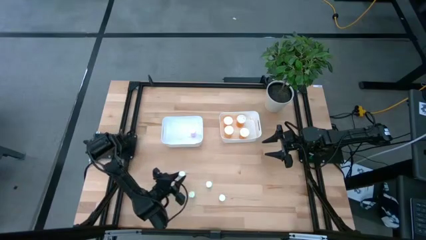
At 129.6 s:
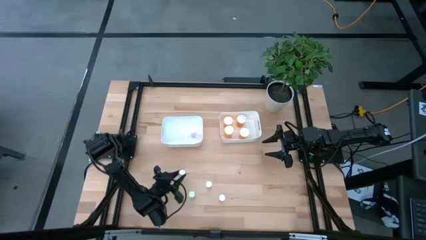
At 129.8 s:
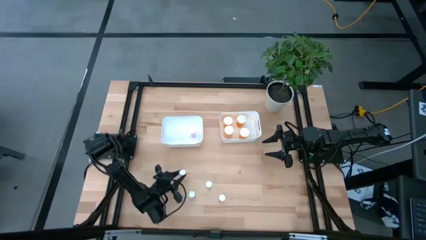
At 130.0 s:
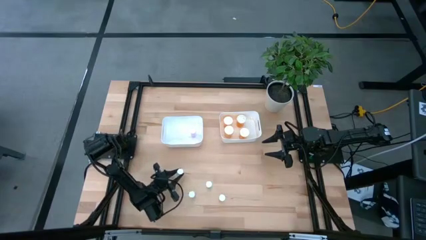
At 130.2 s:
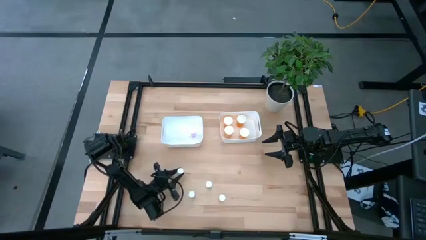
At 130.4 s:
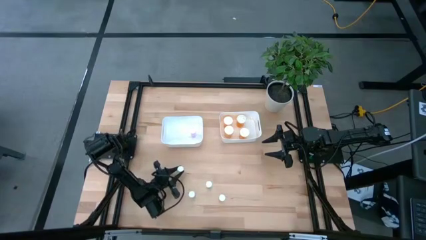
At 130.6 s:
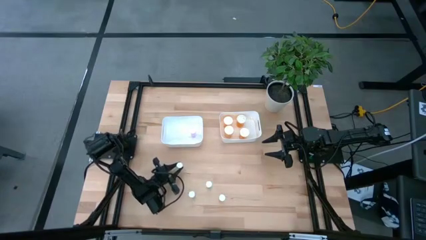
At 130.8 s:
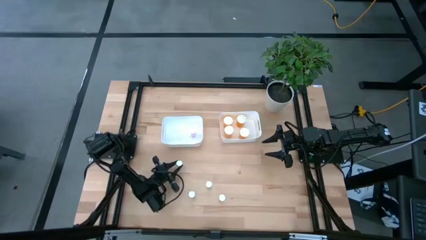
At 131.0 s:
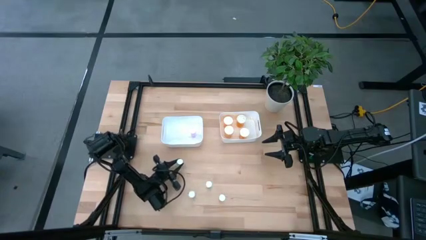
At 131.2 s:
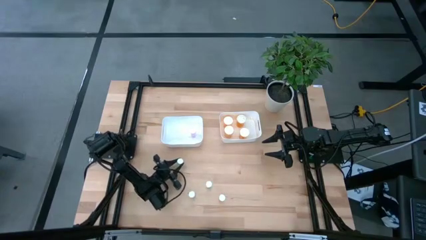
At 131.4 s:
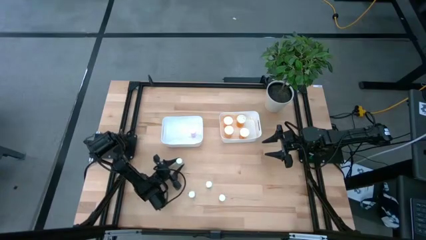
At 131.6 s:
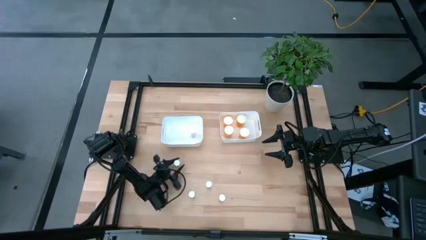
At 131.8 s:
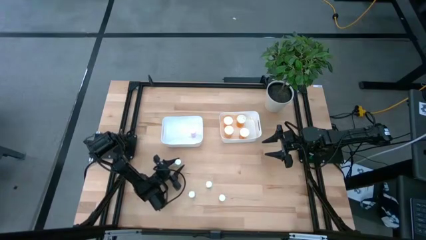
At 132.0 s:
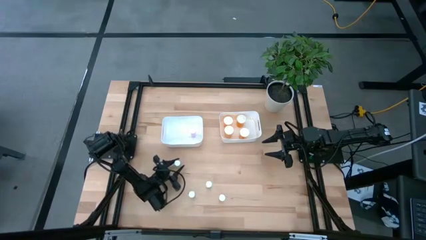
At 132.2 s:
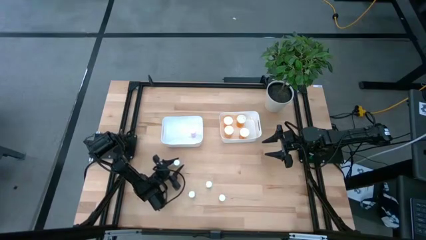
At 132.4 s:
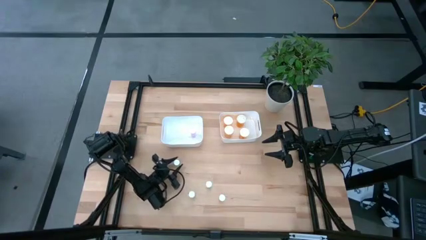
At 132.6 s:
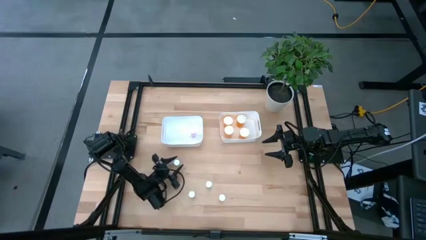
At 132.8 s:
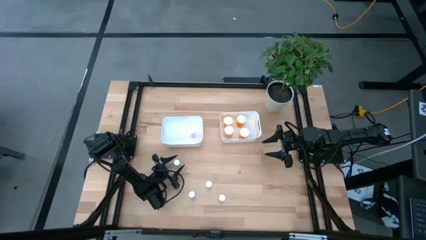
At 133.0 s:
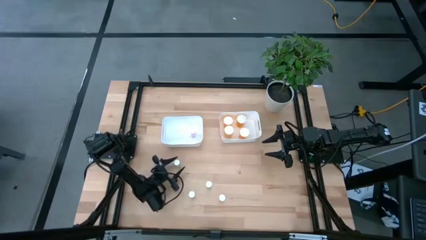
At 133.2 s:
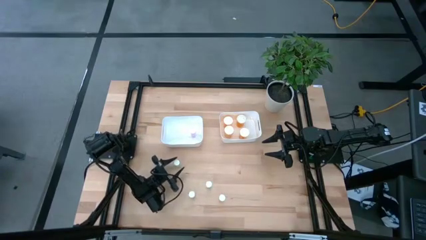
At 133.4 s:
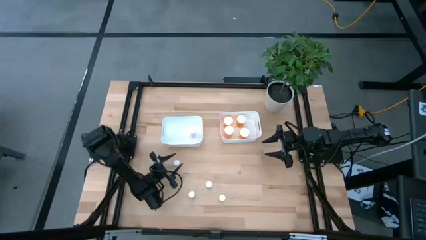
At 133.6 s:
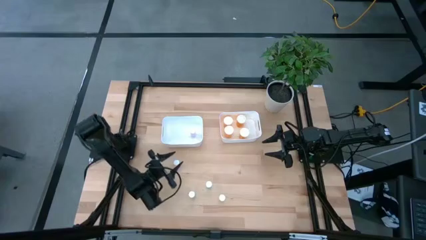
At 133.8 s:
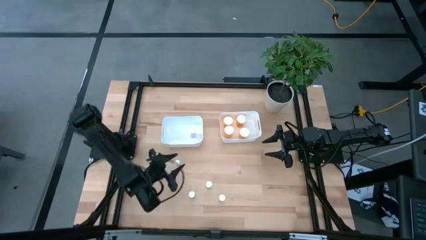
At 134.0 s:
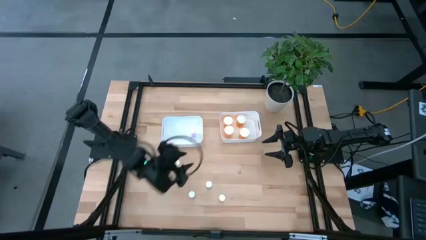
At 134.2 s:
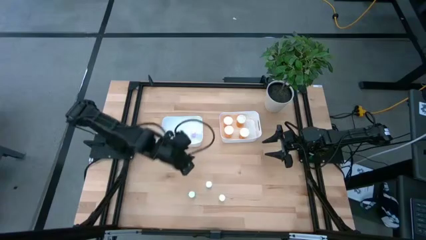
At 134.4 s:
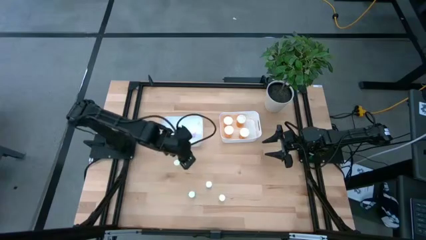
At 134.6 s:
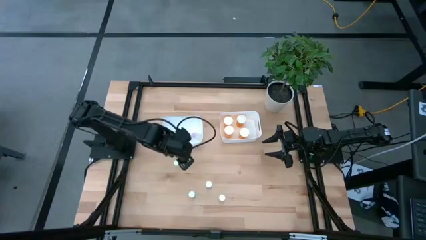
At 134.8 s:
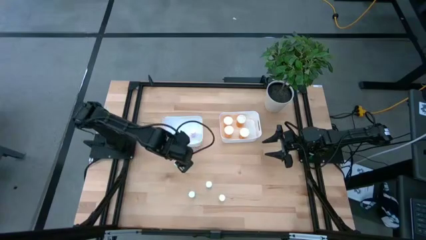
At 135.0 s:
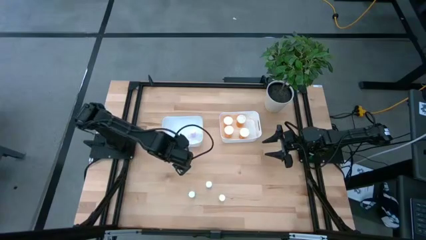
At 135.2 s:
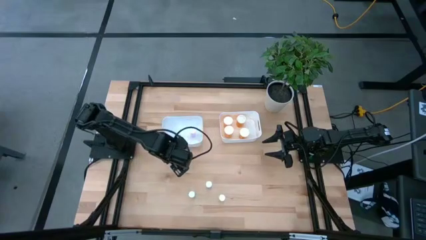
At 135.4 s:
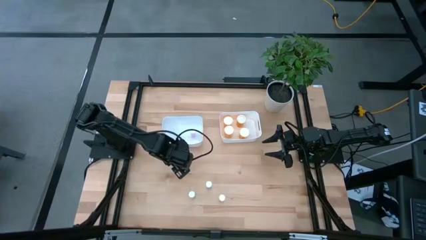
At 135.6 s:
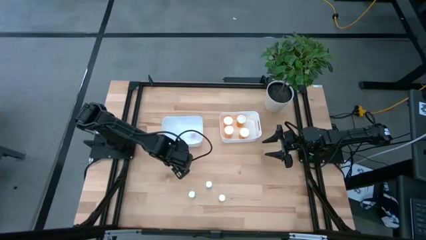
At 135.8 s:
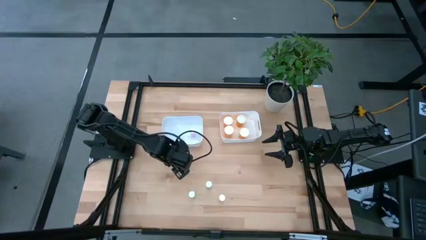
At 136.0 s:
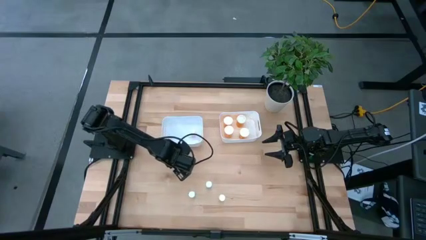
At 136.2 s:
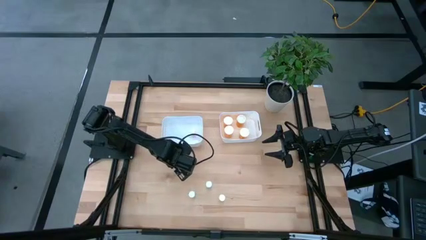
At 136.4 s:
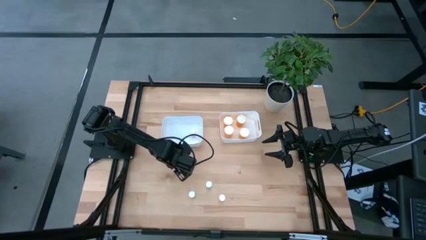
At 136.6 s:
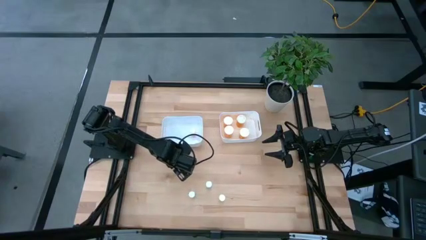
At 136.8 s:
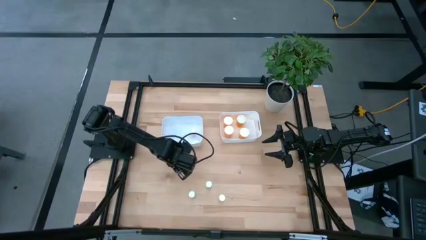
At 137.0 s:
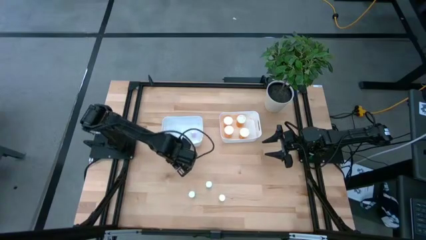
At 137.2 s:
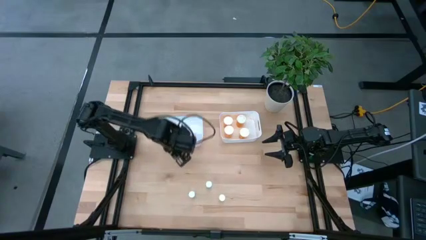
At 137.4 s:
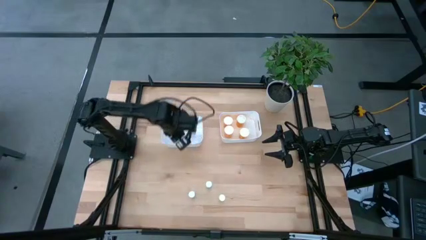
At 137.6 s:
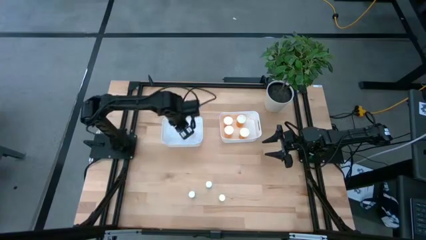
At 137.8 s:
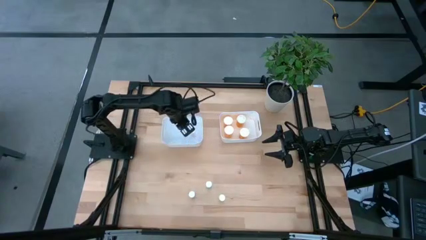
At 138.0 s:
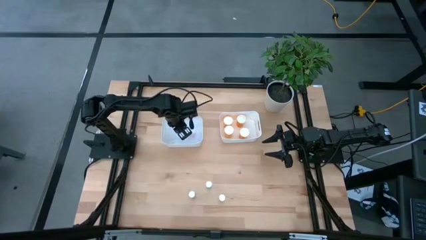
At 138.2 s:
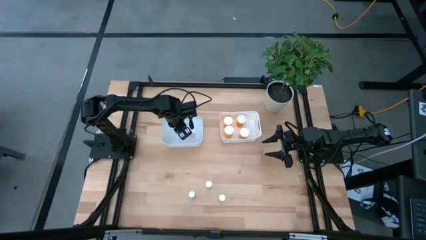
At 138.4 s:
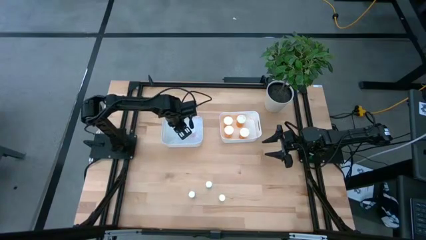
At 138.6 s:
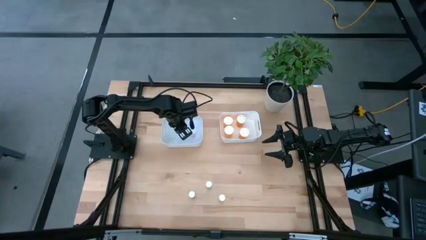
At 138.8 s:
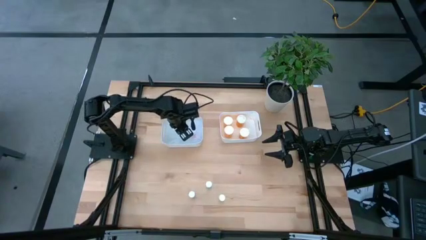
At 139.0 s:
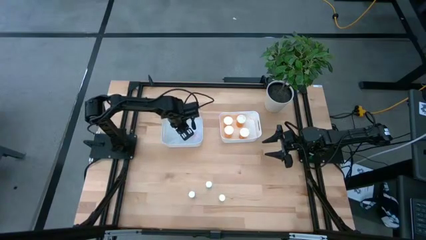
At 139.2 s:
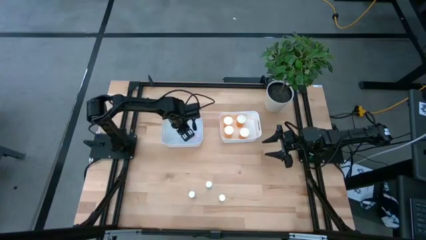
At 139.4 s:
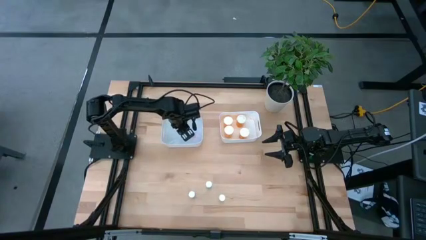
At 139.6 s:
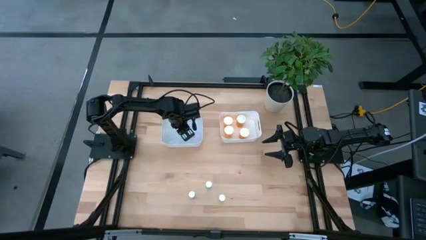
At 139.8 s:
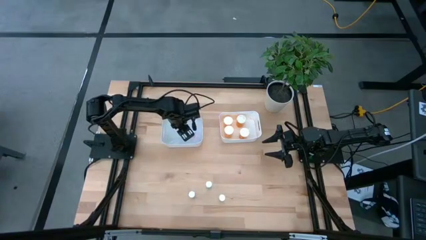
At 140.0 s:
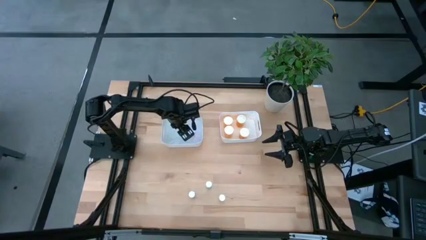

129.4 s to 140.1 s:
Task: Pick and place medicine bottles into bin by pill shape (circle, oval)
Put the top yellow pill bottle into the left white bin

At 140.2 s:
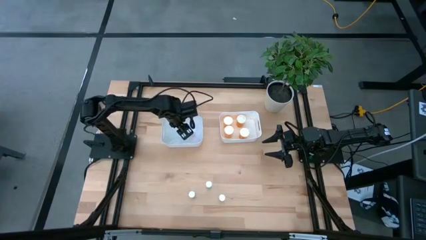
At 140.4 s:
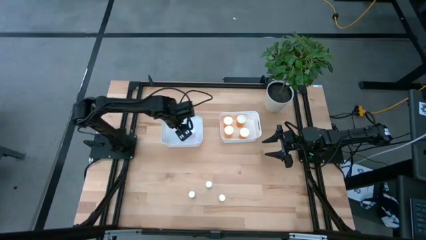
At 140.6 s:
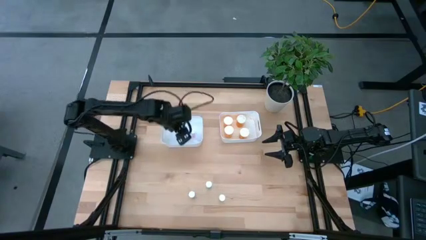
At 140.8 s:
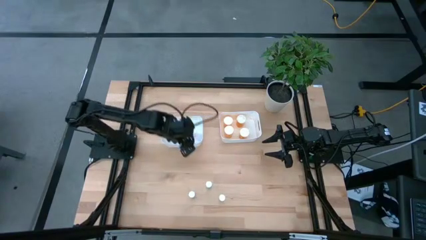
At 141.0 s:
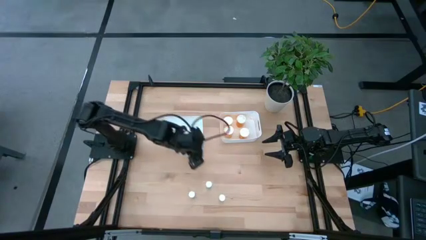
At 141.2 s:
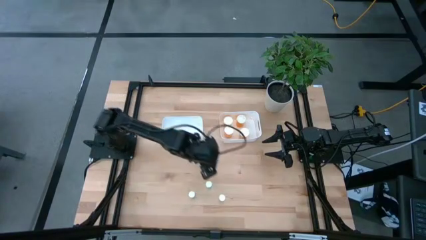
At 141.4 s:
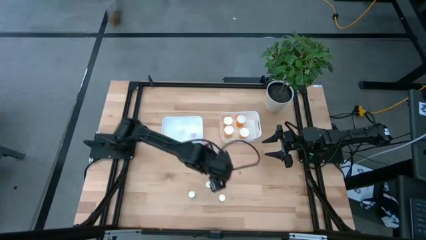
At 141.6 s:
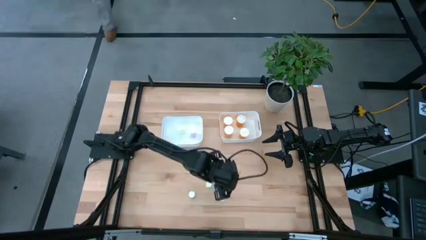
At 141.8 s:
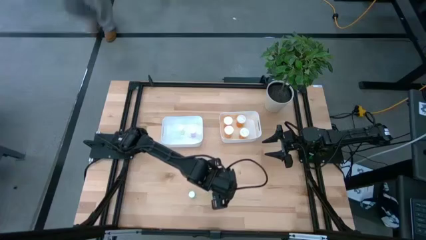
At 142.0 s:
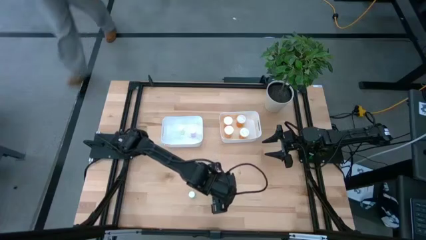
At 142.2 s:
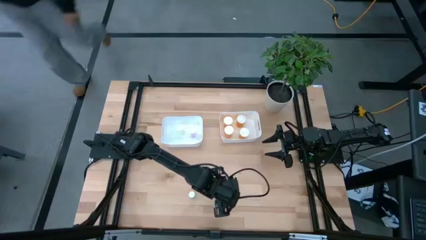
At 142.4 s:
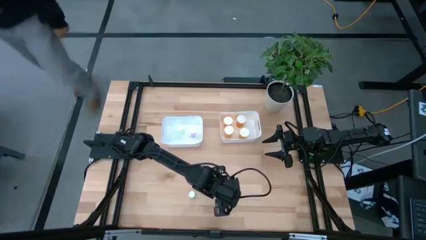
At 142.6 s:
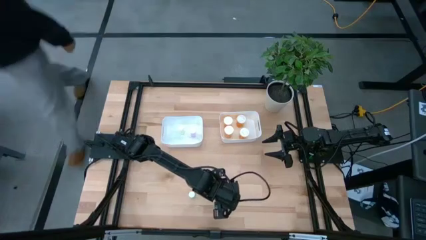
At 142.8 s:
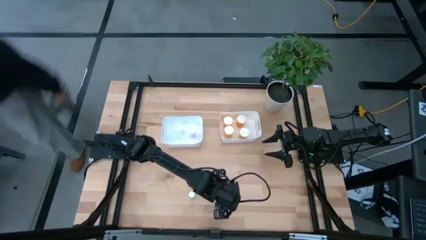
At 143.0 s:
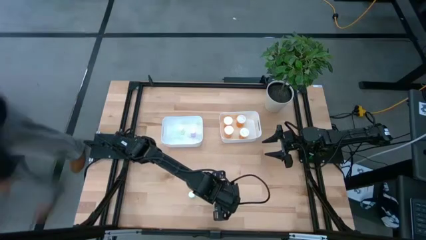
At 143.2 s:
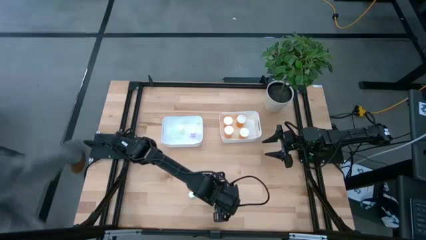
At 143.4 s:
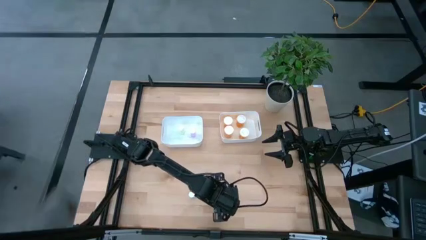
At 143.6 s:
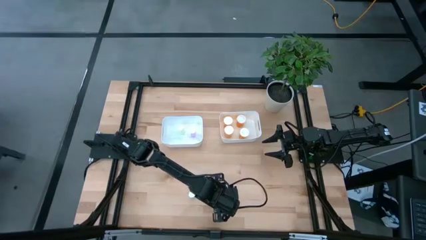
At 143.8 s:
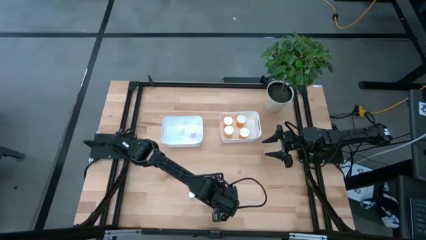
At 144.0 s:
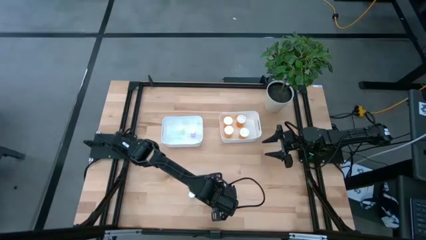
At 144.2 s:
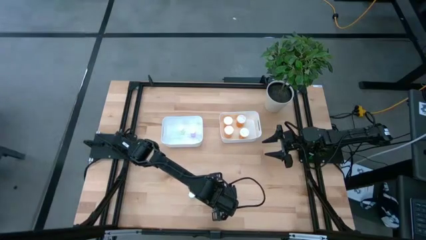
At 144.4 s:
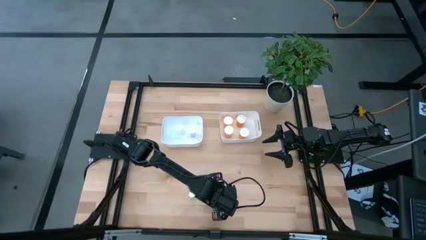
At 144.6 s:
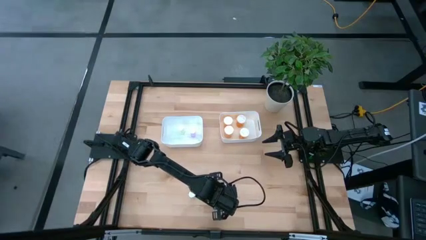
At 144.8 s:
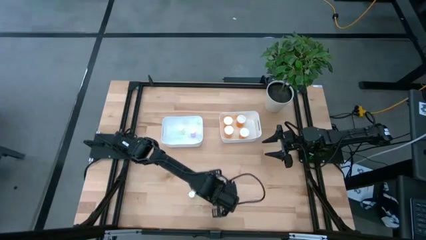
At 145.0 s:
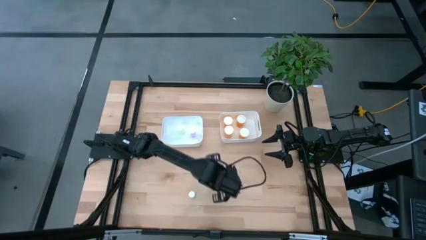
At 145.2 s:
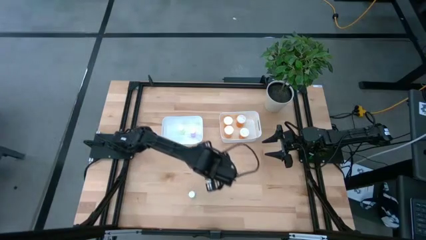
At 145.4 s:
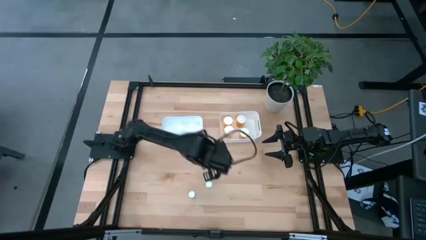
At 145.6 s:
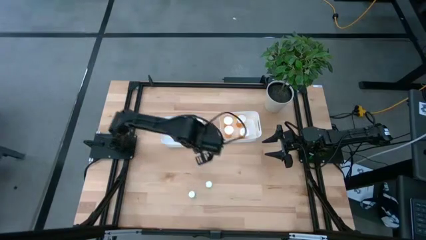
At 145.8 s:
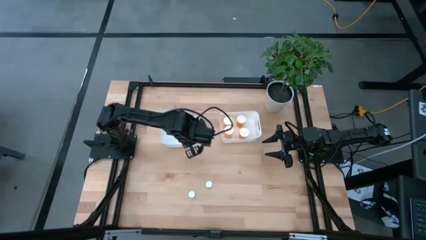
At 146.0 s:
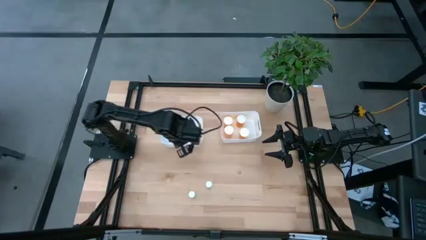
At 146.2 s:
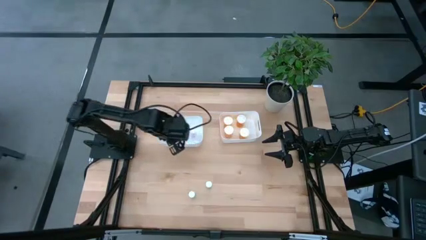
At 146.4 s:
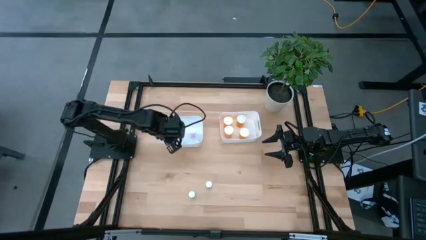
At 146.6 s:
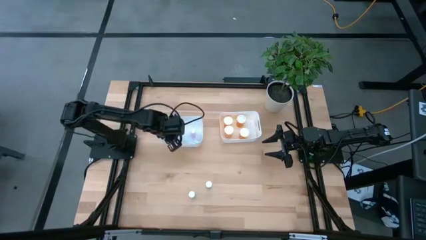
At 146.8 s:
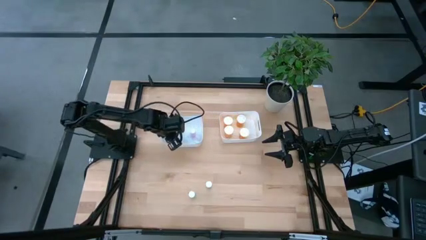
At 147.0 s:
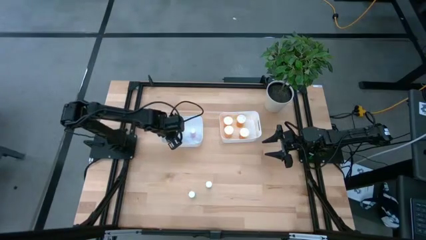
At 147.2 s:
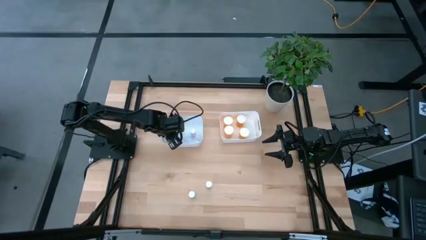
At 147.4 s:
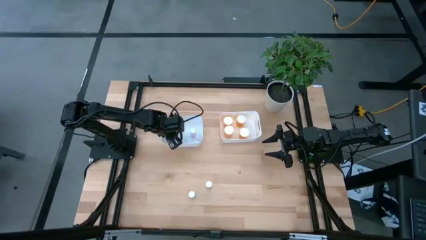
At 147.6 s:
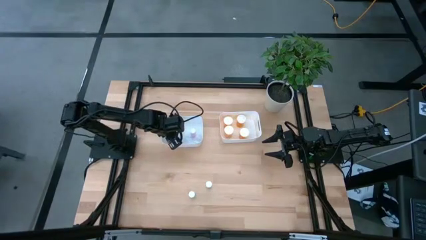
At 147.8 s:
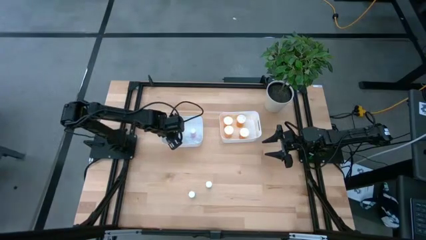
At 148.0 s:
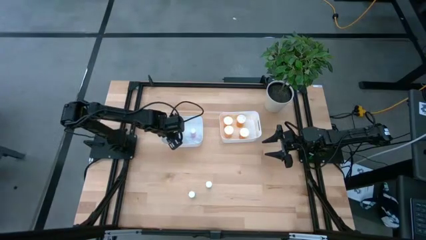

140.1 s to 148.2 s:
Put the yellow pill bottle into the left white bin
